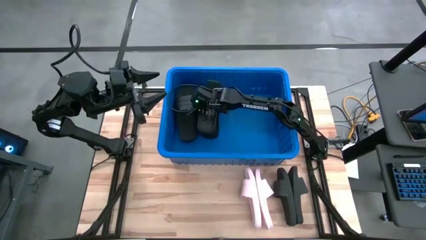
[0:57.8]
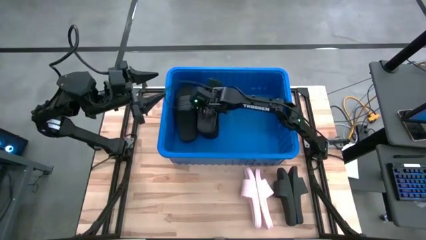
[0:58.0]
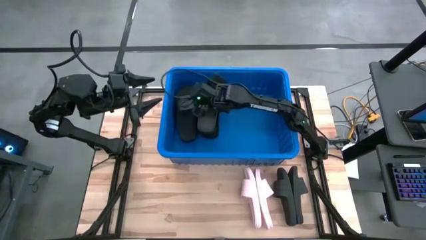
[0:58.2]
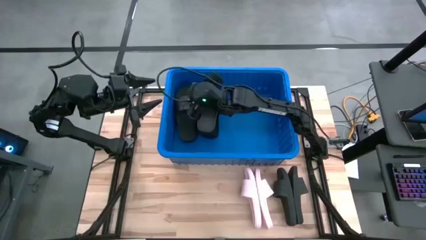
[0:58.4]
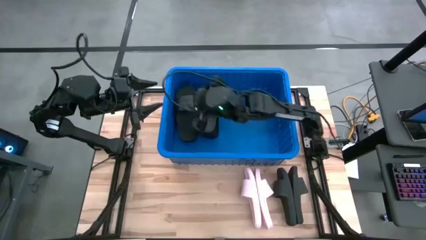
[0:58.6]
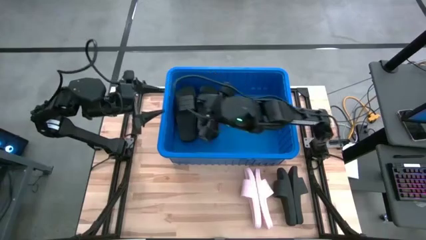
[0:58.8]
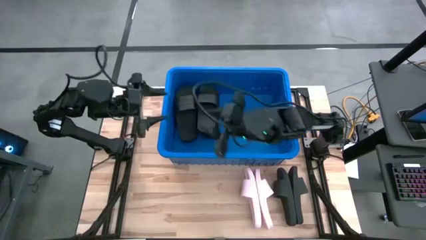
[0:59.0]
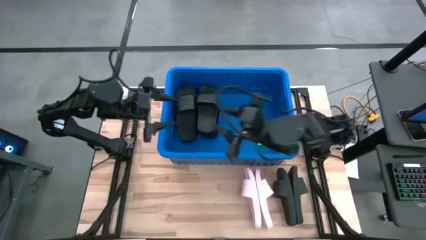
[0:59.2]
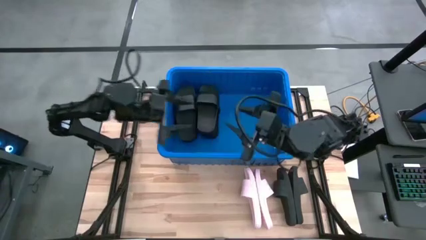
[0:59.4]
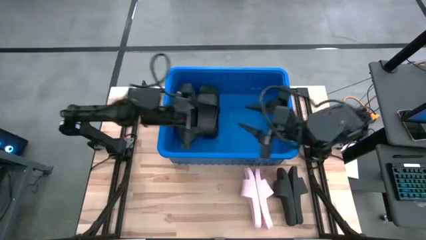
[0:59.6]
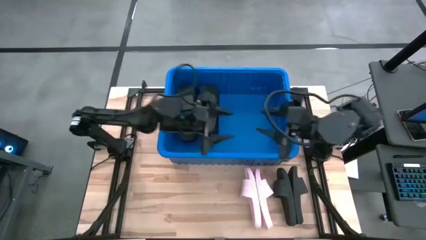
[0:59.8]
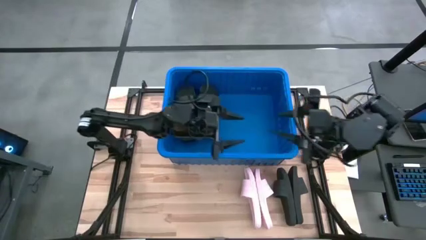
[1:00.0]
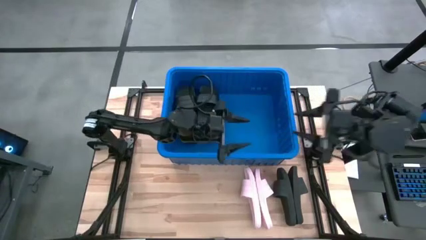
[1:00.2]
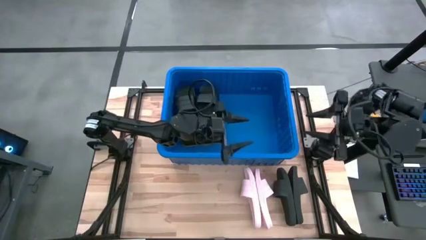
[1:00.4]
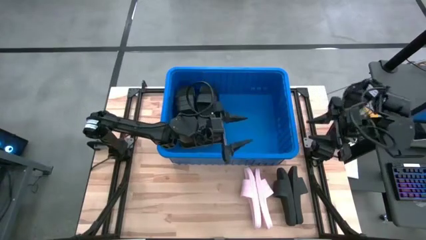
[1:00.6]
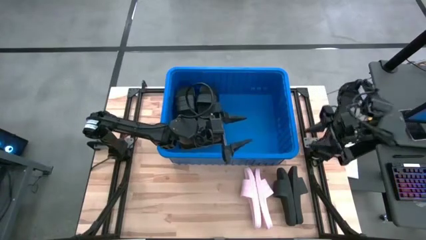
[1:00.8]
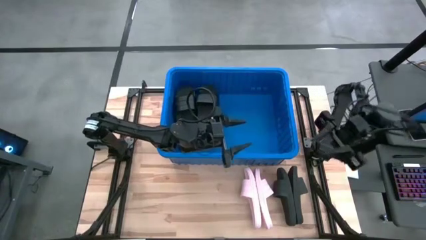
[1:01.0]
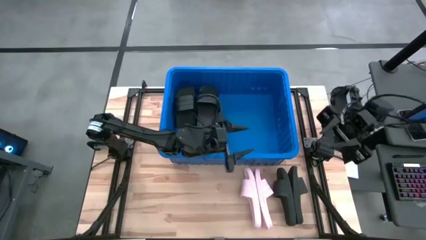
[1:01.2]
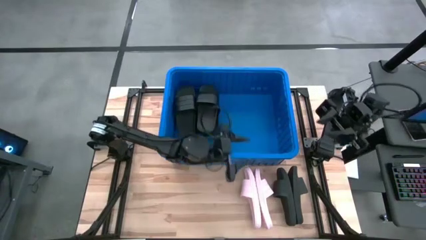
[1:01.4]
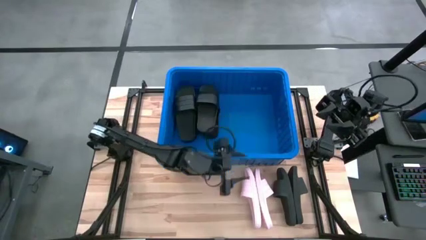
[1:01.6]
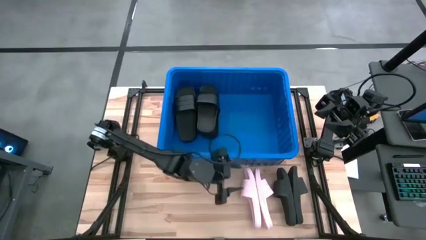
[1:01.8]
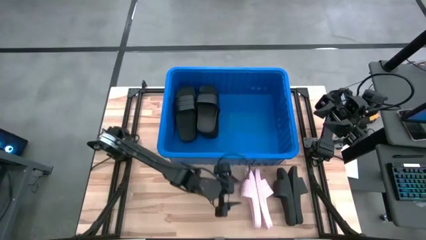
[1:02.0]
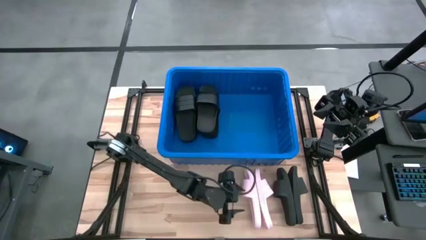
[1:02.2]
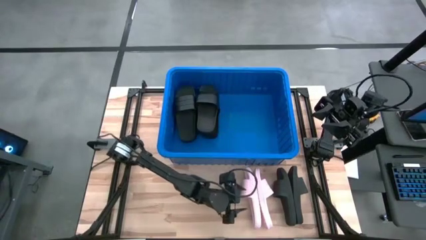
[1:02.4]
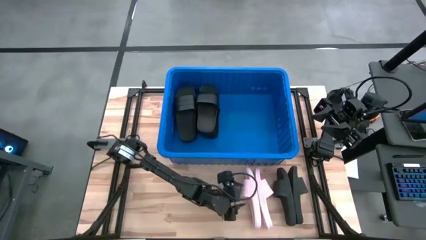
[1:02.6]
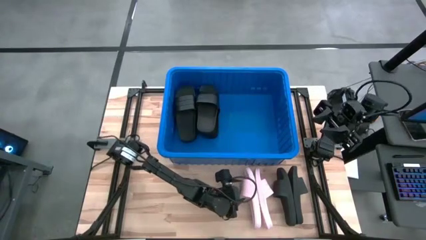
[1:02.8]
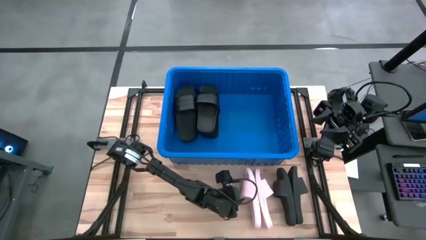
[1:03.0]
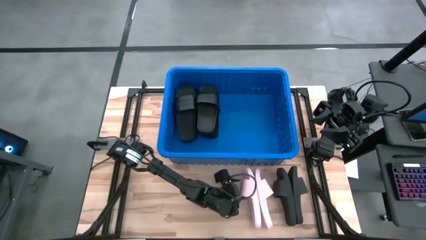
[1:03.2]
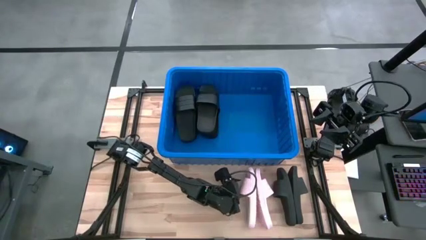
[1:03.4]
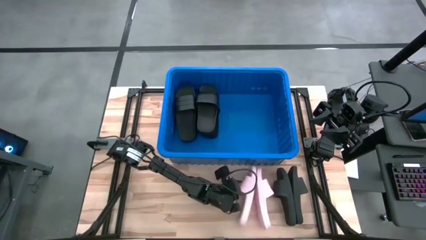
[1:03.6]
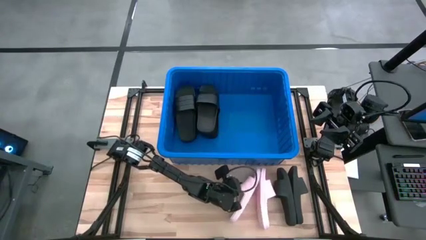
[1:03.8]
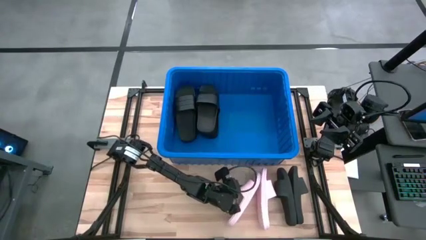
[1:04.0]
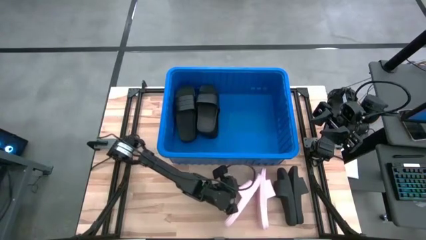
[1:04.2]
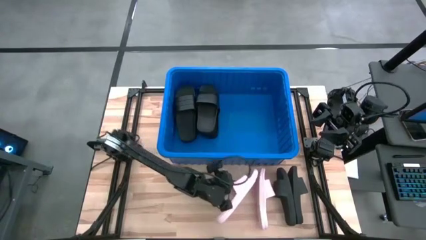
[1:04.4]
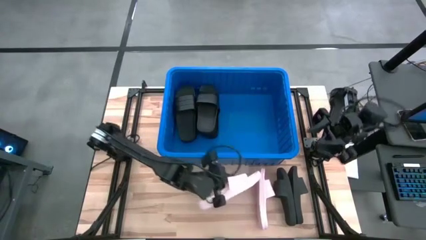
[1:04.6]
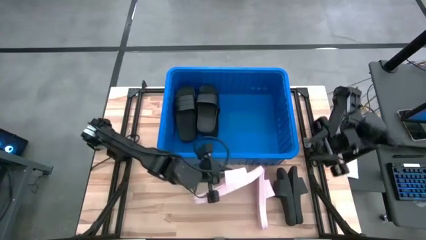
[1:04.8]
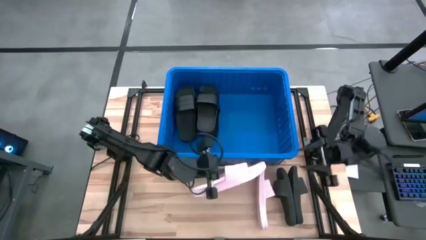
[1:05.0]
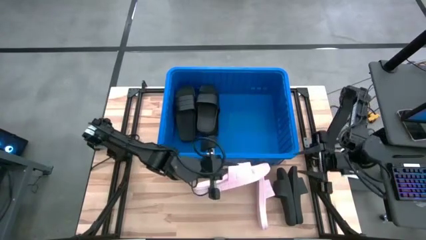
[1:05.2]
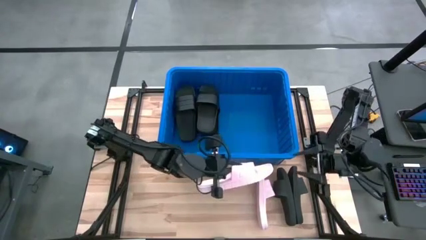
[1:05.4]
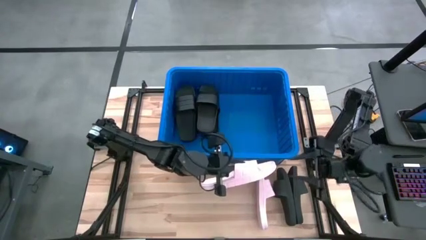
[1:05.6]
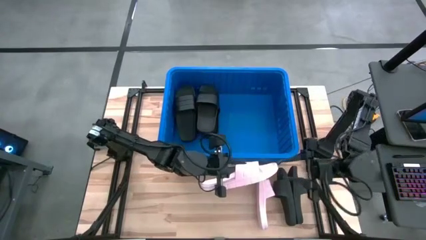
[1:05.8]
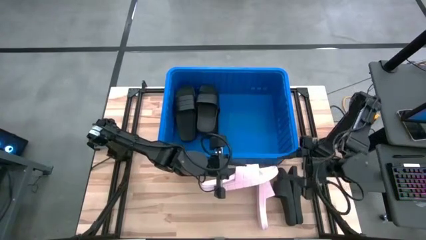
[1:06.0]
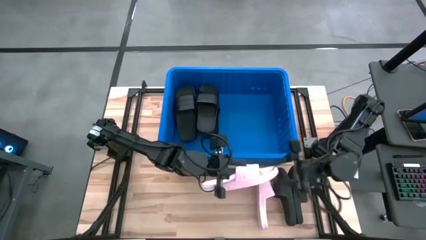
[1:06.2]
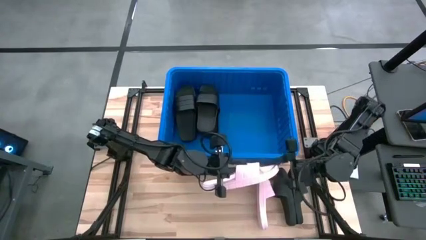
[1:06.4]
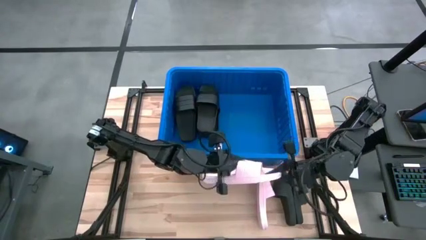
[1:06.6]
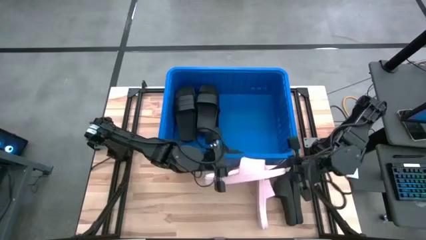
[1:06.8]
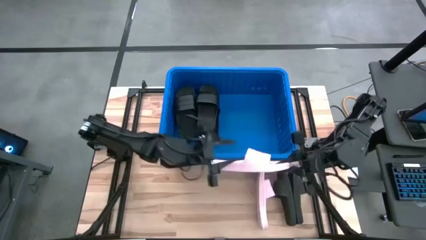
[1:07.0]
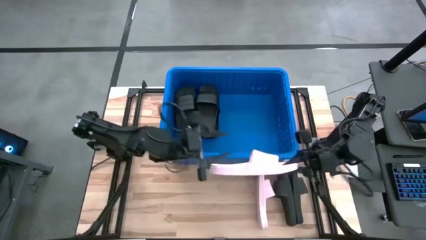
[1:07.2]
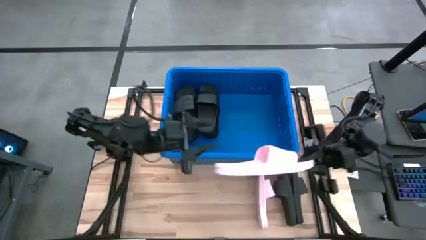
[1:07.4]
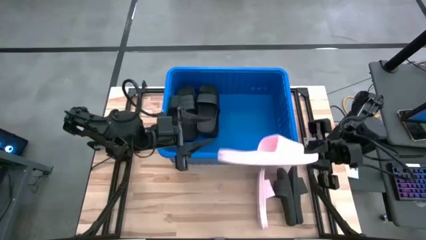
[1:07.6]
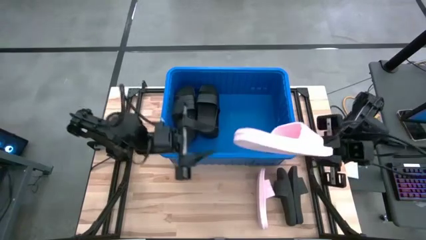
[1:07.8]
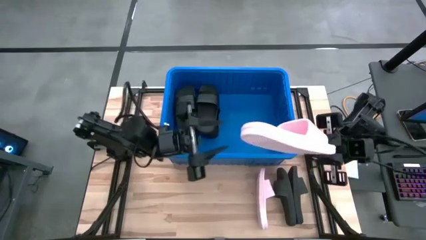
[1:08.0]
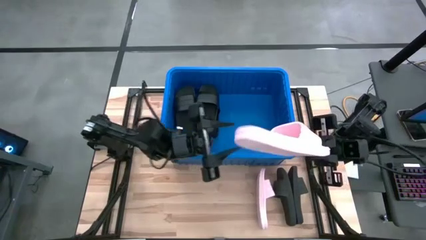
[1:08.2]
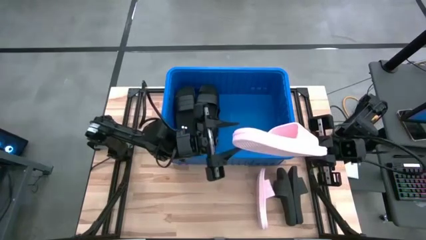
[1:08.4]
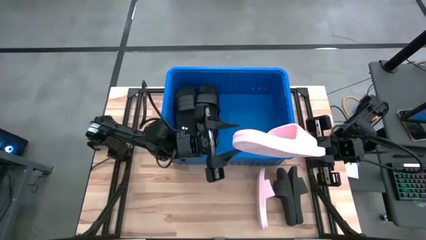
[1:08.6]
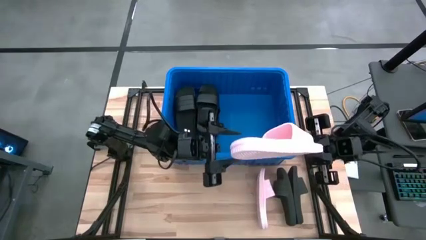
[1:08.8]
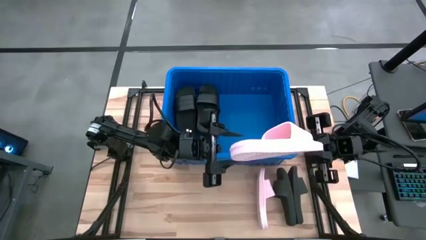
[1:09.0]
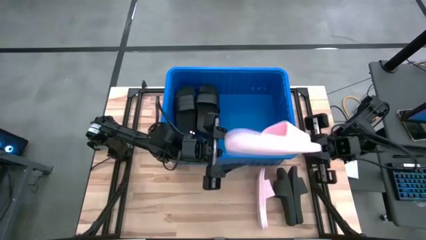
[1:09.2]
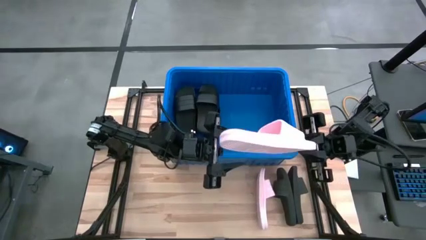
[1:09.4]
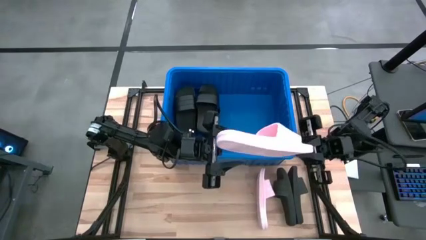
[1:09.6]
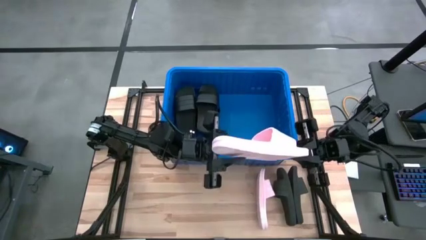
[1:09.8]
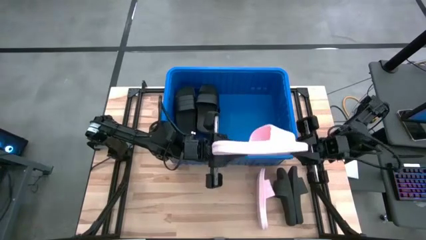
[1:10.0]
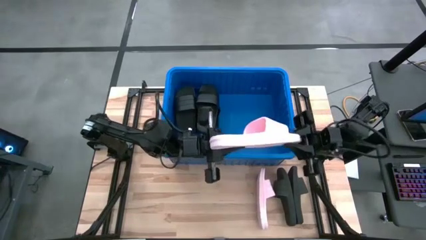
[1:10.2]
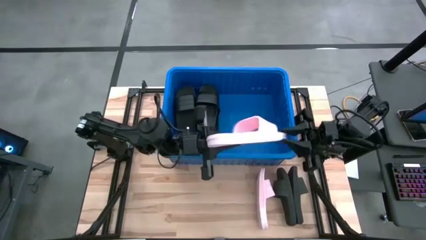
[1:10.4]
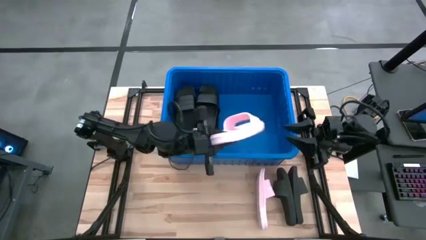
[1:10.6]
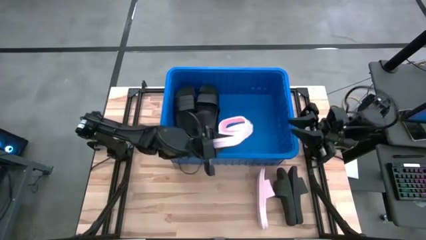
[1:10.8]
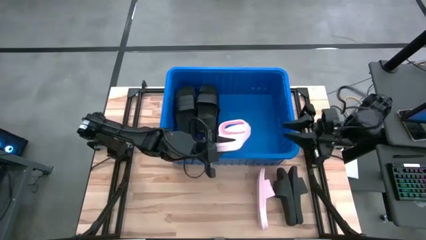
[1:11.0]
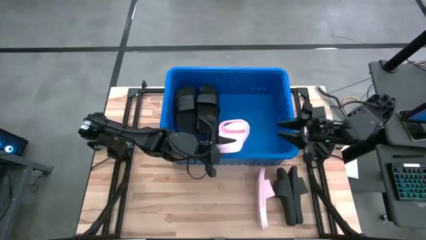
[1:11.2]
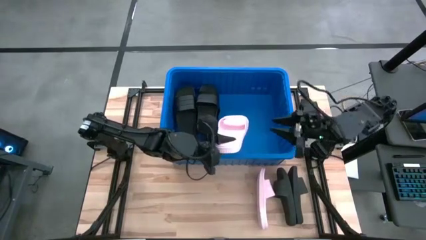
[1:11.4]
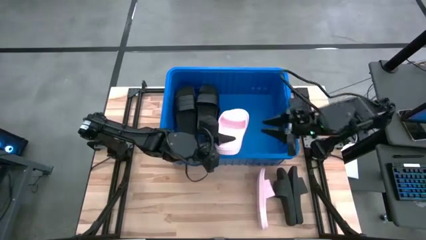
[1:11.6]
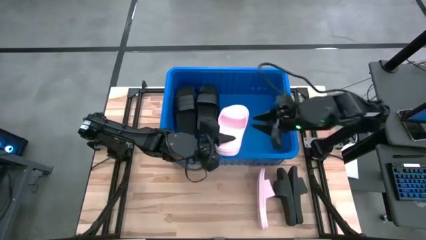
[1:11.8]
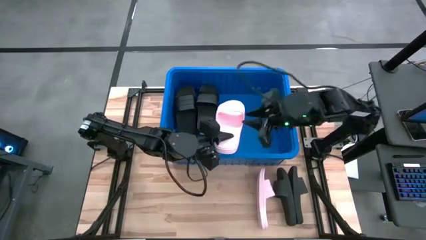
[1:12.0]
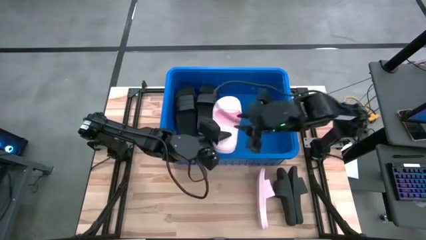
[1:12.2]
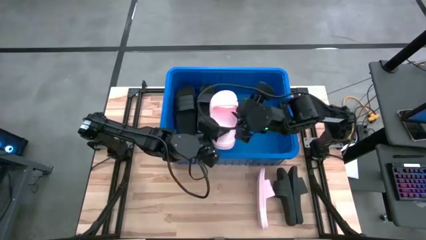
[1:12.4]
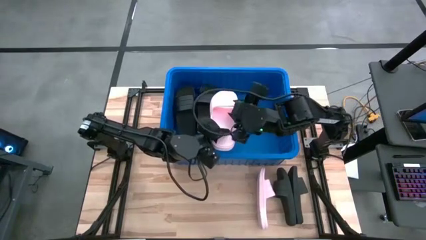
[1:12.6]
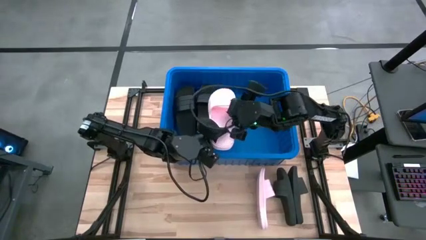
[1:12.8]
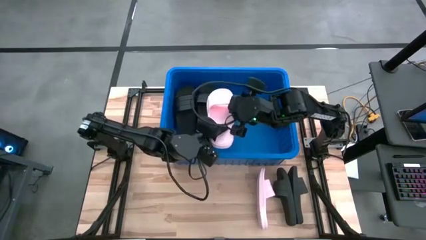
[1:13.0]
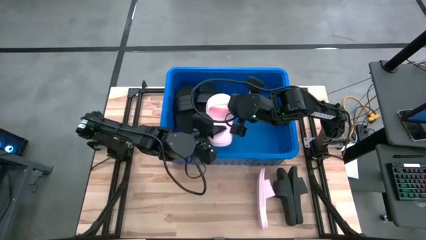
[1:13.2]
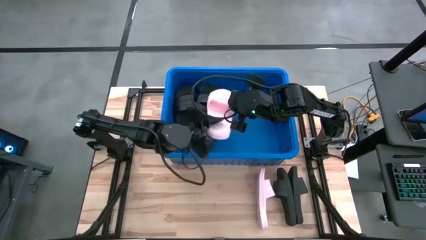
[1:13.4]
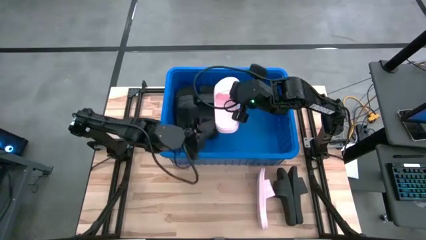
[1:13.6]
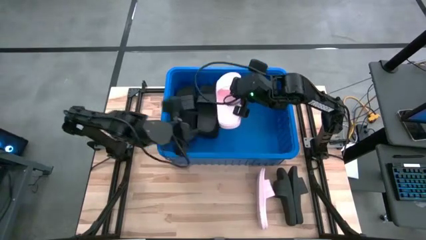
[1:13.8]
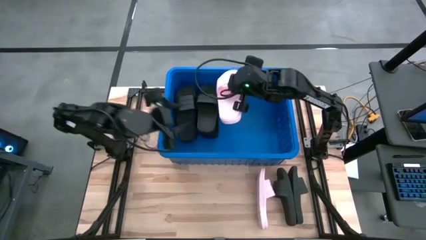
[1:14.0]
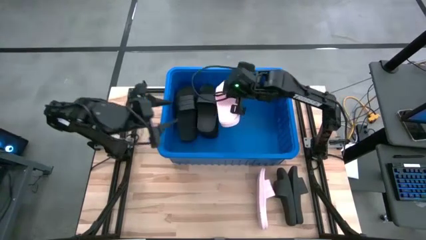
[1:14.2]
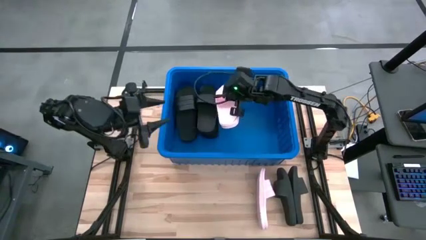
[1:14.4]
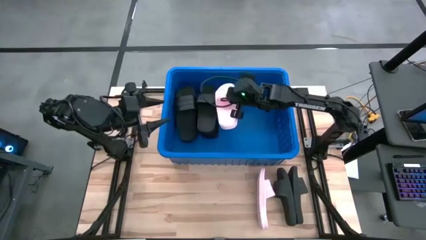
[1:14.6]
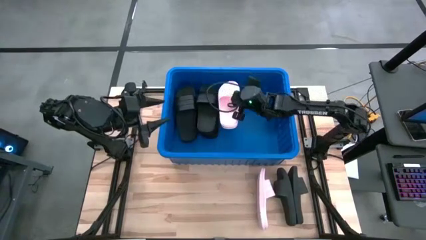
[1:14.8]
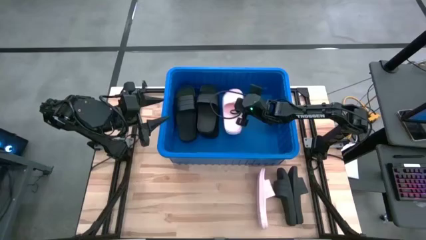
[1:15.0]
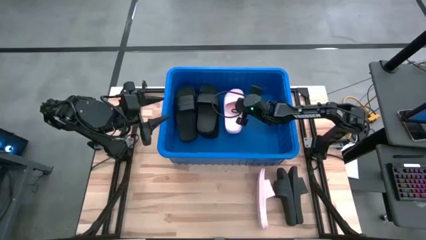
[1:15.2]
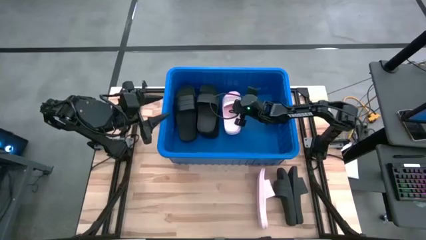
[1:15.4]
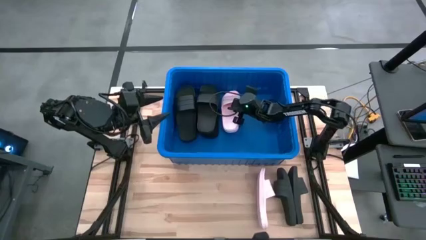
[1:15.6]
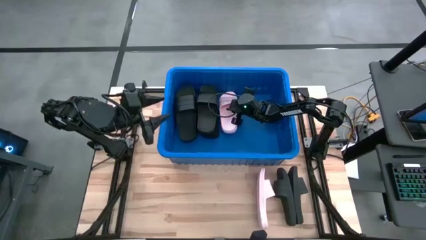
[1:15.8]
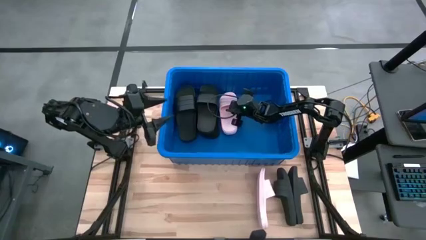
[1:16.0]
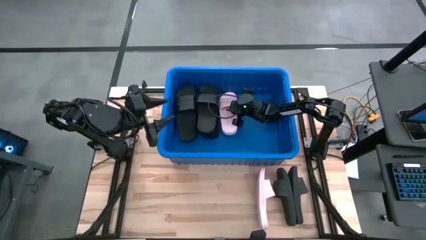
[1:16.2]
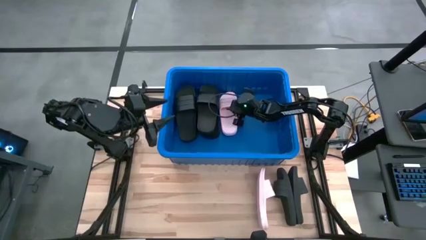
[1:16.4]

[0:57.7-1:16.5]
Task: Pick and place slides into bin
Put the pink slide into the blue bin
